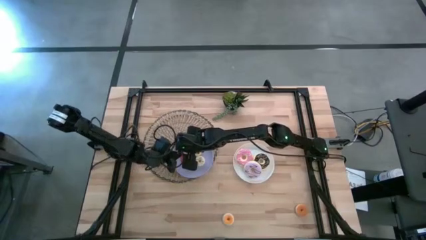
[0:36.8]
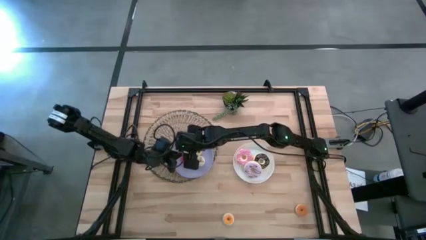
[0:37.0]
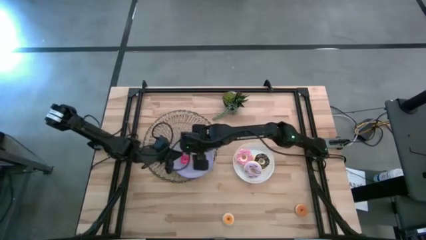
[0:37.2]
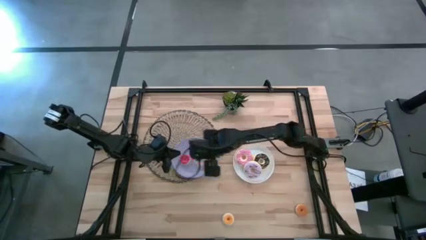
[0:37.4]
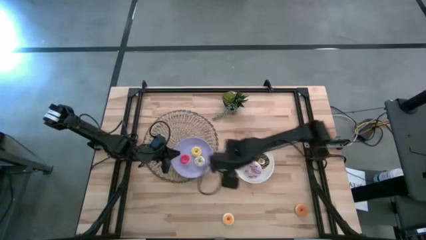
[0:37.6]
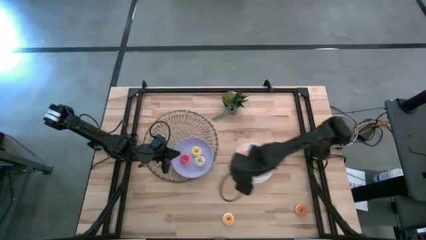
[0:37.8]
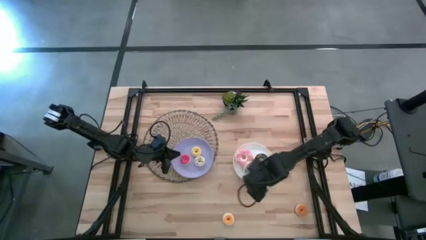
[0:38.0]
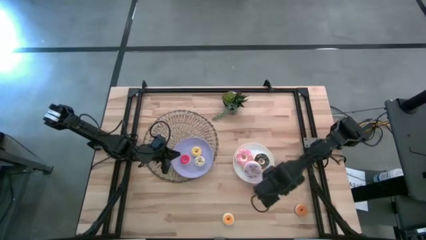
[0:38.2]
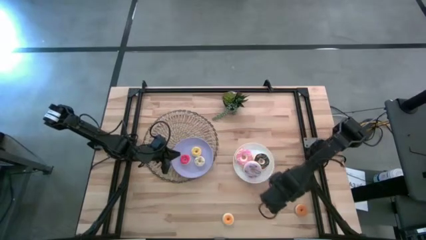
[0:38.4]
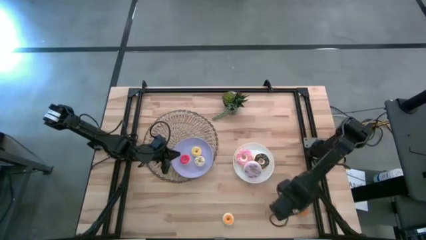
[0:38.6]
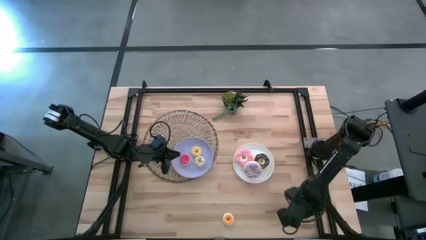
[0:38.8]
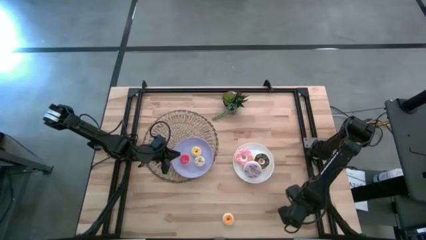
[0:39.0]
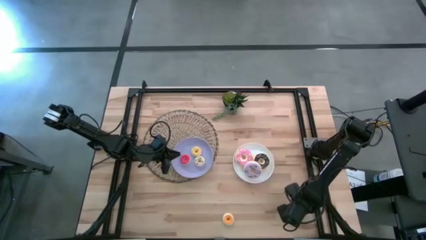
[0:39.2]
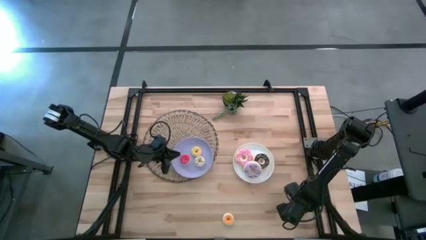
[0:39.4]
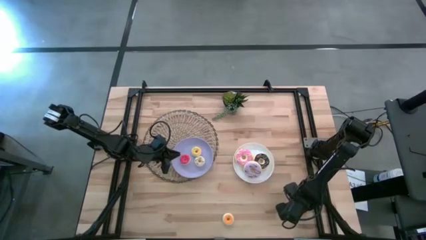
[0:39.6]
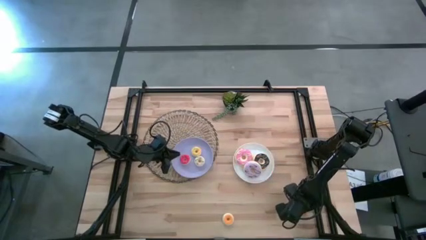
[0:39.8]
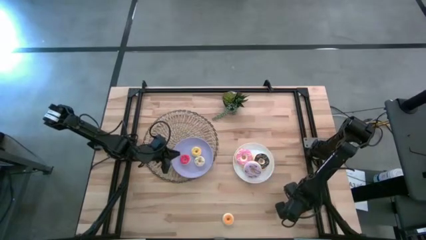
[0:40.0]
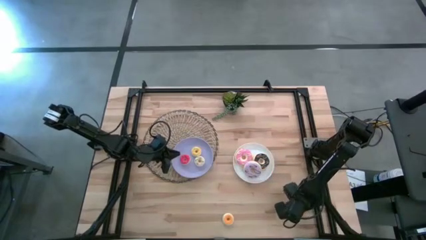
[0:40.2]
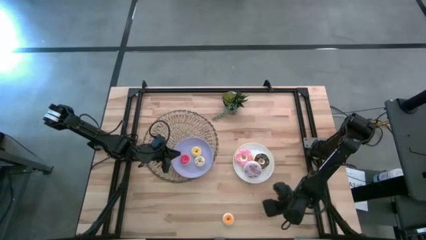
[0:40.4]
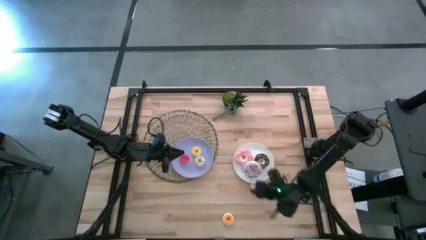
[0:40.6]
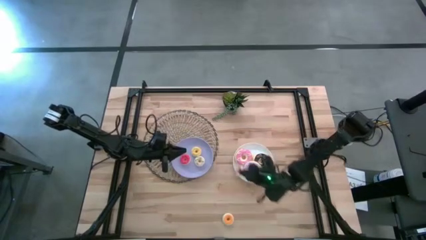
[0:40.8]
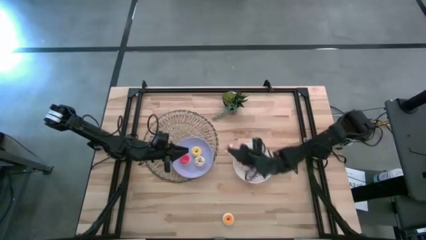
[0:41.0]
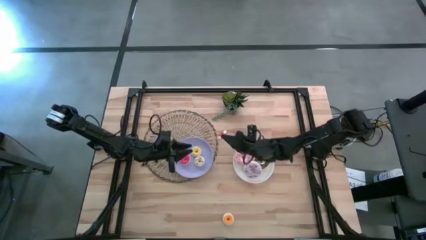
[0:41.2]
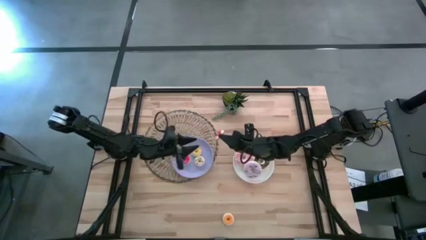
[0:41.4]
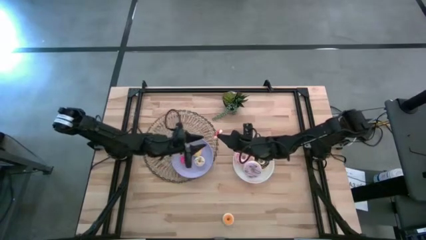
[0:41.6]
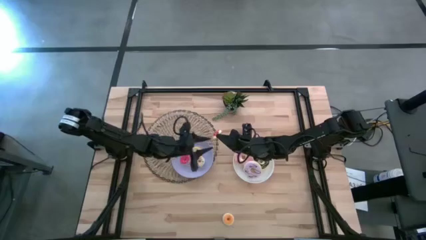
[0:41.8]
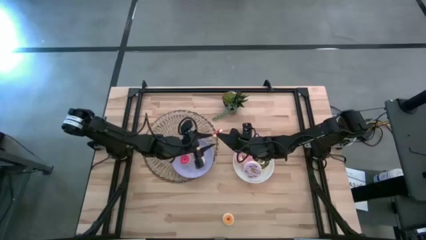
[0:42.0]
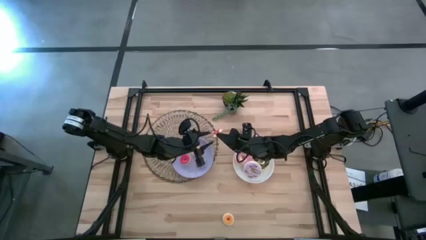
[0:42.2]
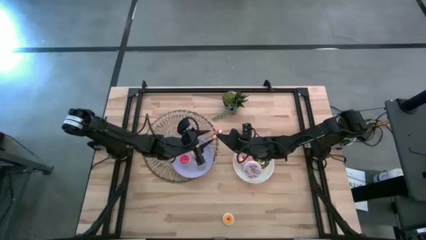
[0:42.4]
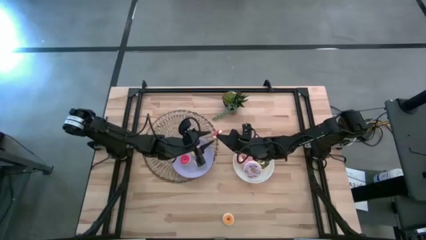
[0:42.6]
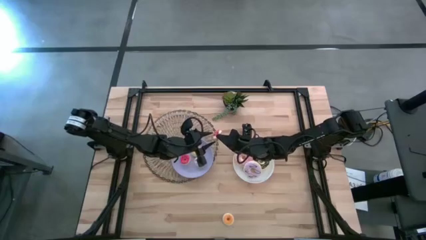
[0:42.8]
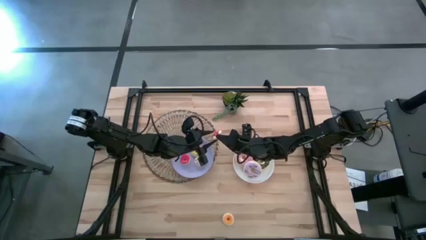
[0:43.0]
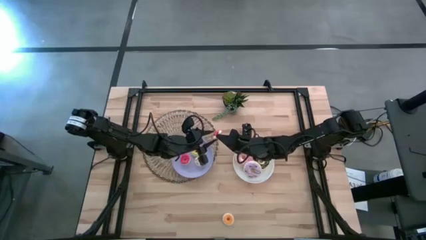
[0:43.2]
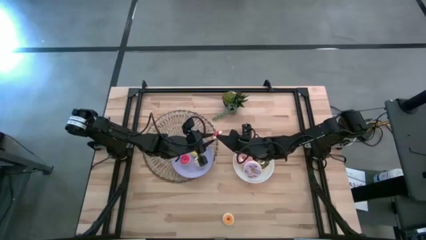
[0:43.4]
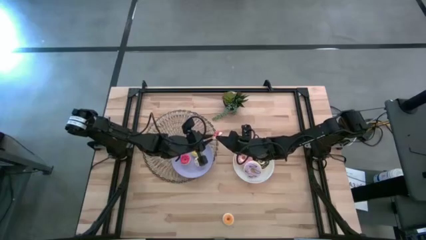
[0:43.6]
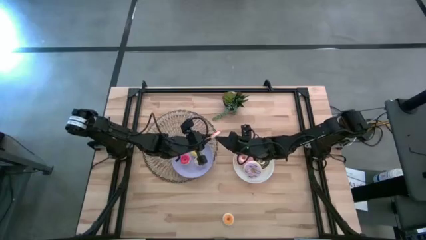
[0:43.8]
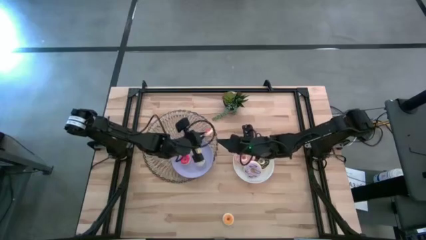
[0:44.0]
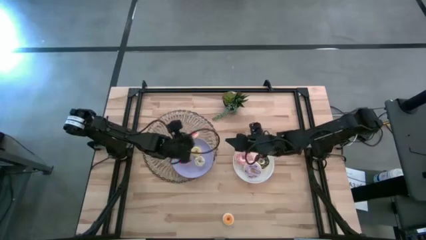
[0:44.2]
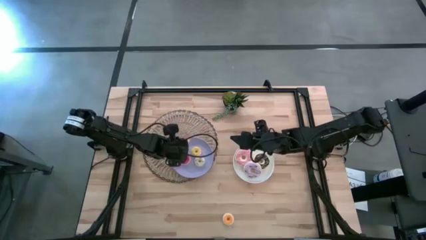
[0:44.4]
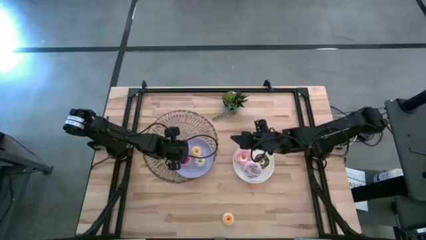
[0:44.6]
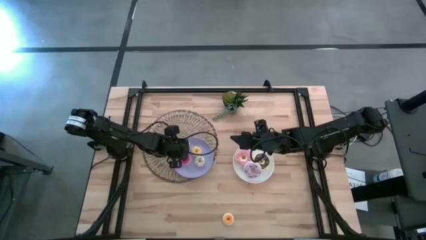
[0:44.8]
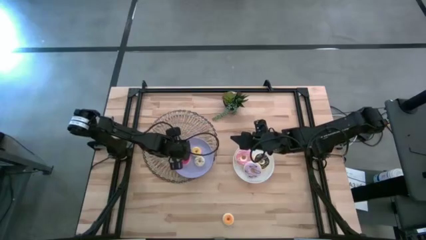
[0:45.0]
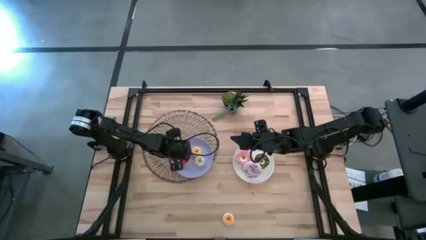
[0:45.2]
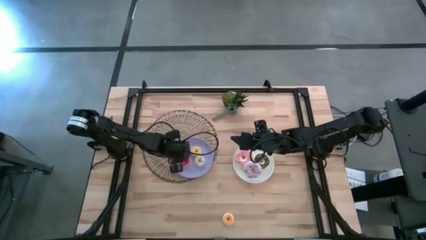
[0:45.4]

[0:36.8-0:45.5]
Task: Pick & Place donuts
Put the small orange donut on the purple plate

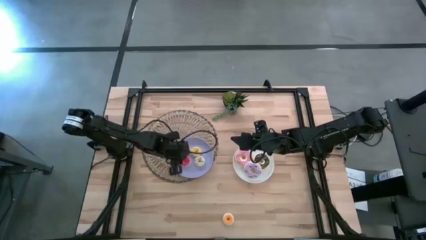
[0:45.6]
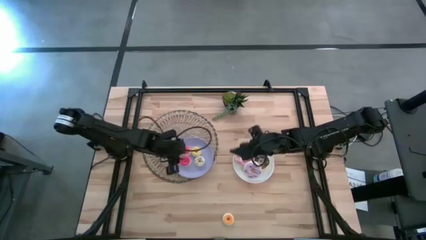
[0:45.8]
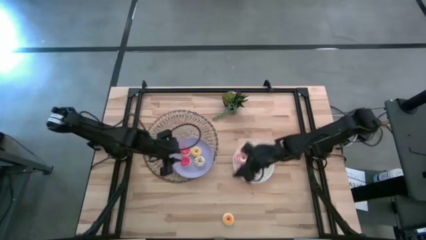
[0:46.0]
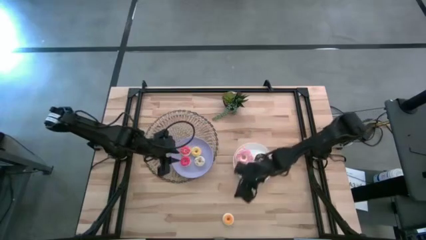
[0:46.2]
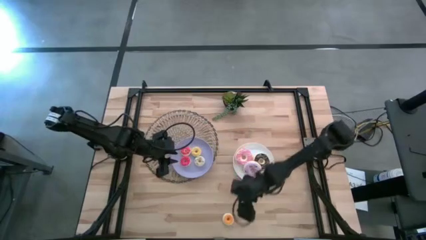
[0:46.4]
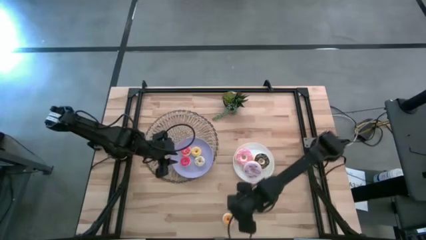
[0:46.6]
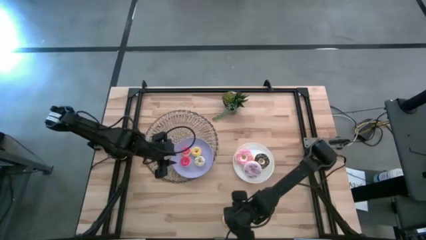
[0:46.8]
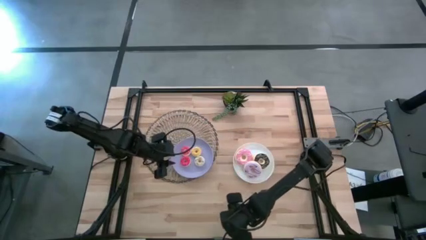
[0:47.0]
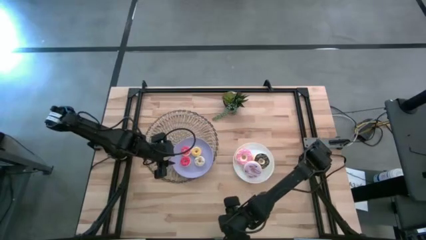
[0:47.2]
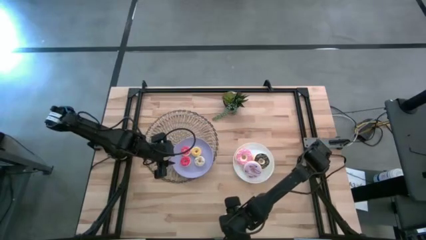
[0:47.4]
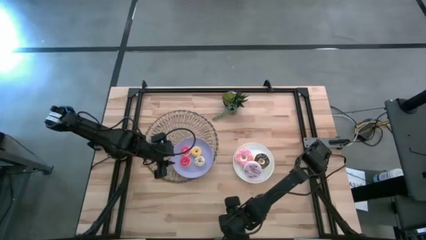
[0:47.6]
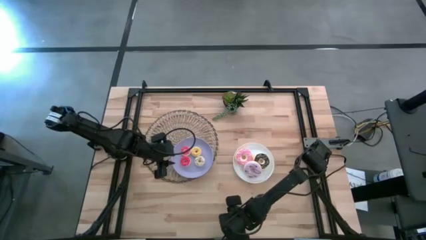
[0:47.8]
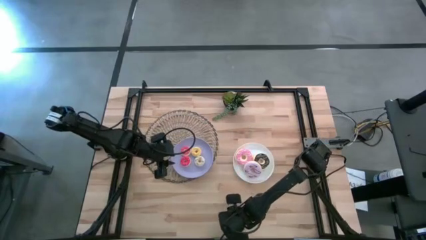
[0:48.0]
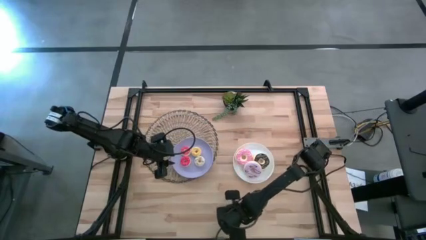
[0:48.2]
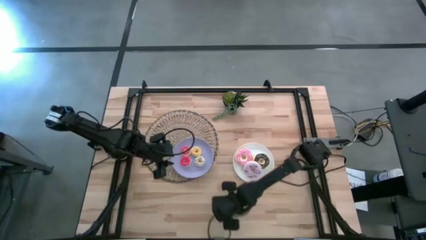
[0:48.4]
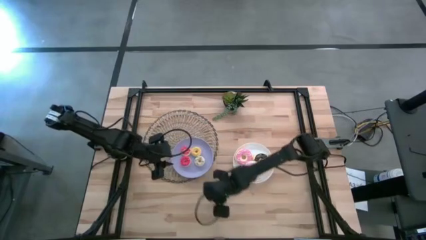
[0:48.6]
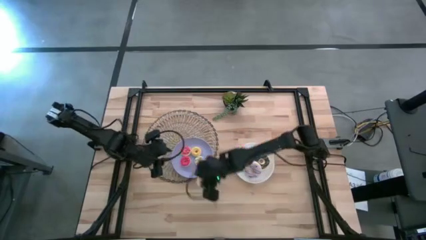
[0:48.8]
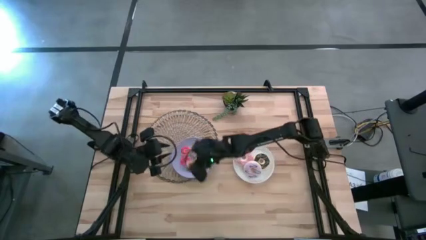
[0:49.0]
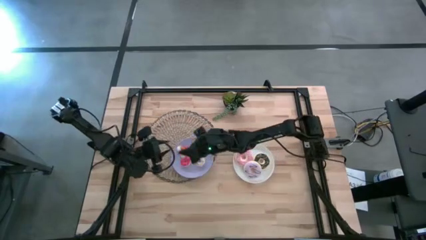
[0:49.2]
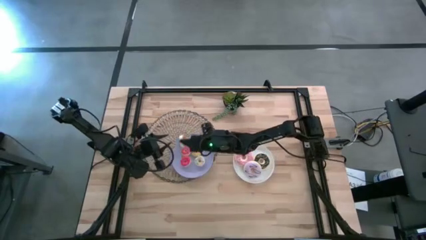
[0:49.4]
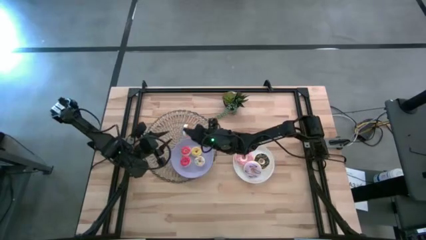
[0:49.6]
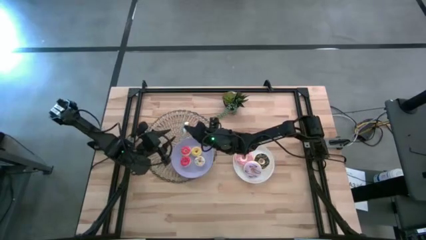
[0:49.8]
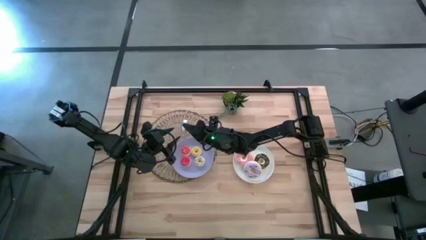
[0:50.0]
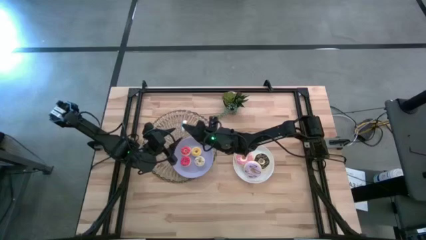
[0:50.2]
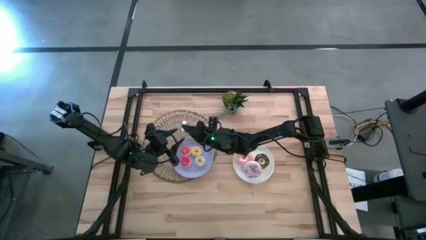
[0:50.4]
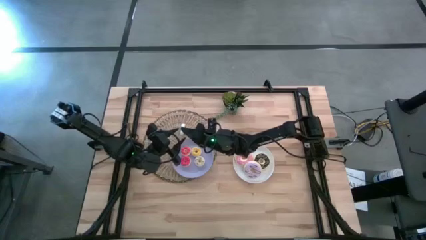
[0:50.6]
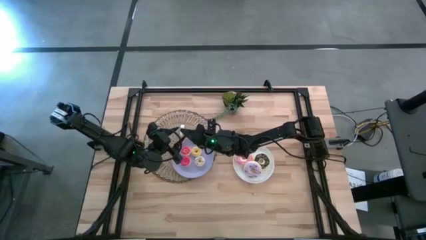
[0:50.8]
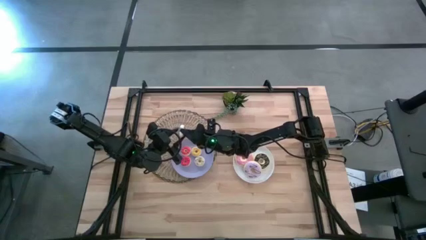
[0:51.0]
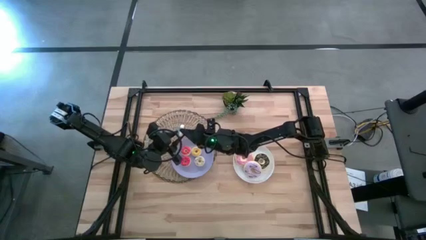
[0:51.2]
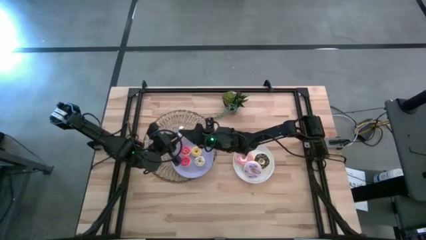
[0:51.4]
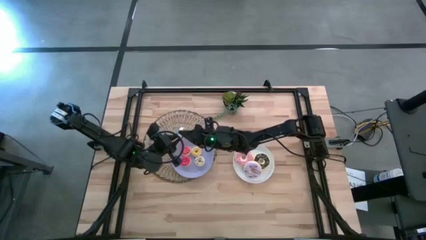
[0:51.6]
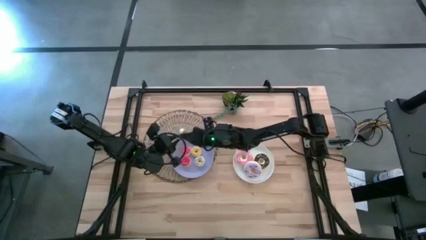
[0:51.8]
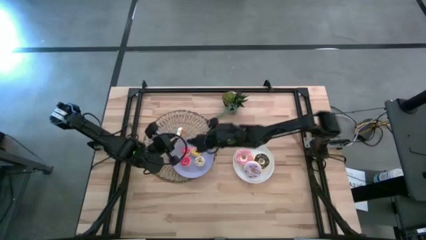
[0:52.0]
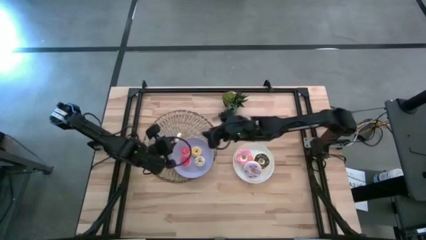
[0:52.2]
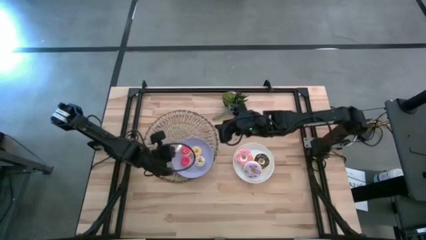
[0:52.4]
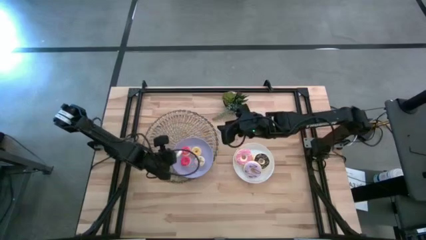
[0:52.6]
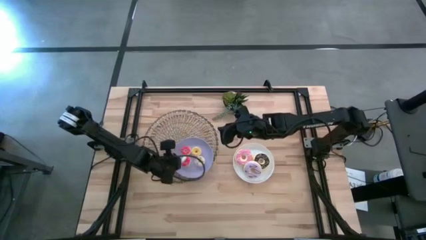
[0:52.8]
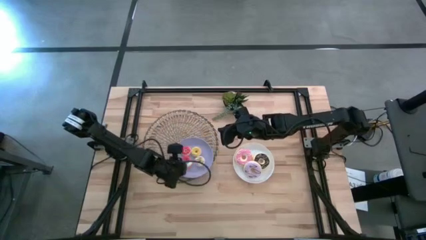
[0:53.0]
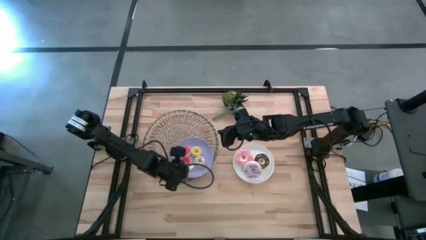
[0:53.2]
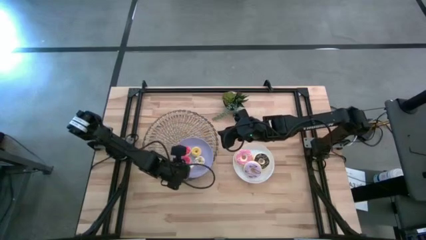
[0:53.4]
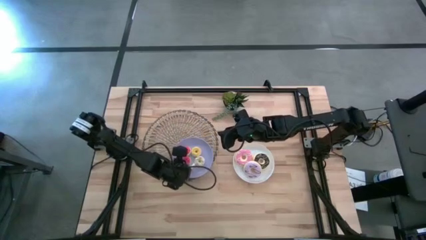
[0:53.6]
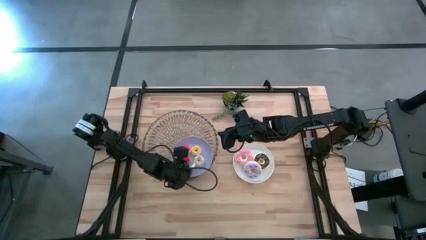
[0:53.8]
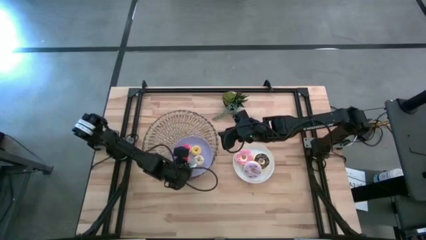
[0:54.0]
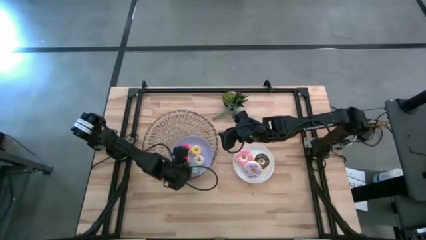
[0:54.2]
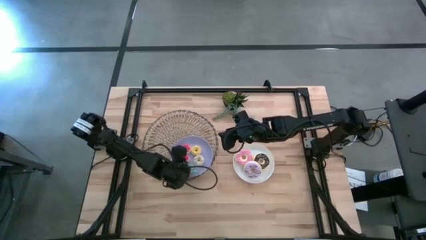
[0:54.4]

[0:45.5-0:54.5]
Put the small blue donut on the purple plate
